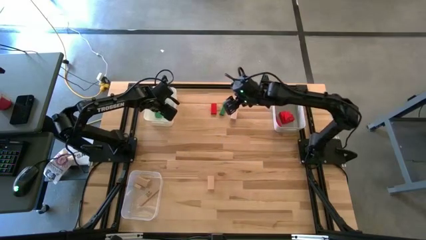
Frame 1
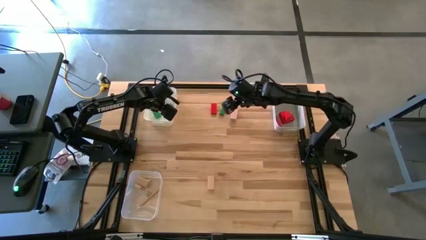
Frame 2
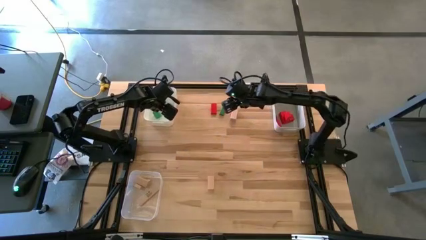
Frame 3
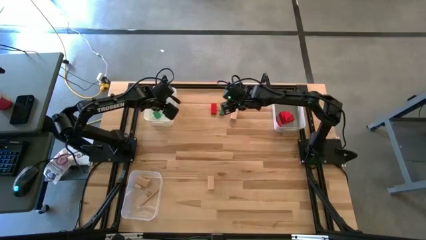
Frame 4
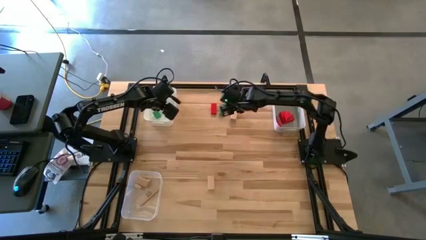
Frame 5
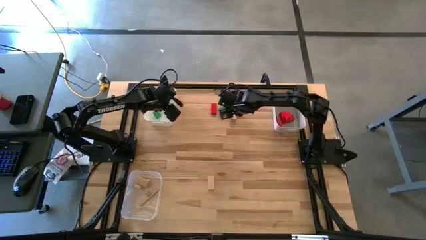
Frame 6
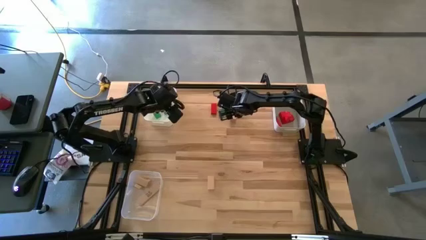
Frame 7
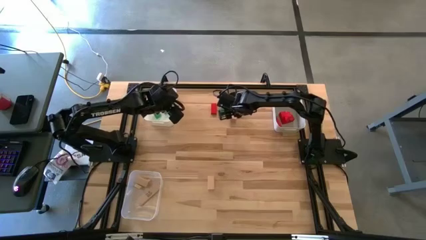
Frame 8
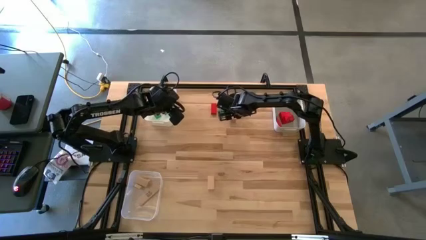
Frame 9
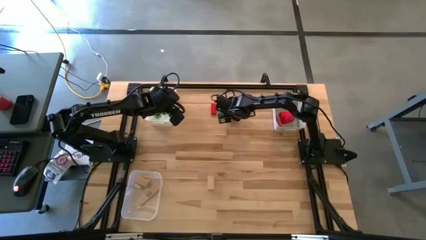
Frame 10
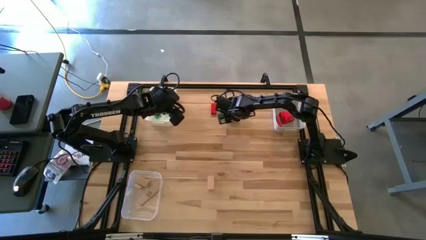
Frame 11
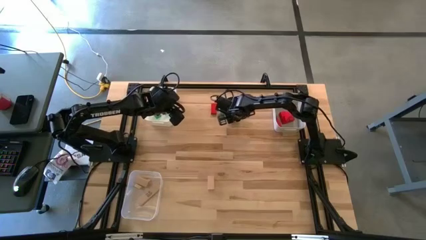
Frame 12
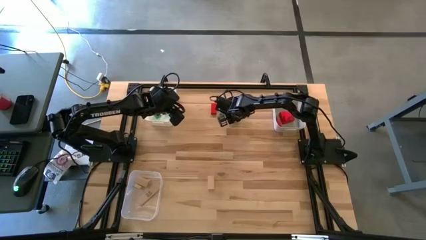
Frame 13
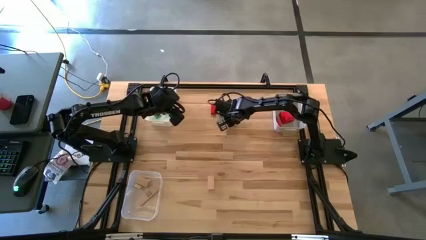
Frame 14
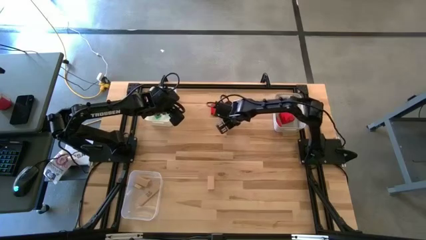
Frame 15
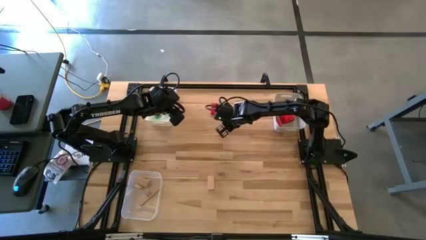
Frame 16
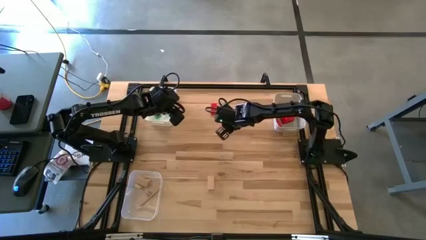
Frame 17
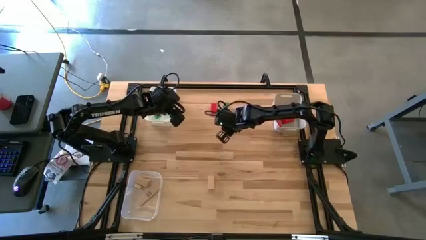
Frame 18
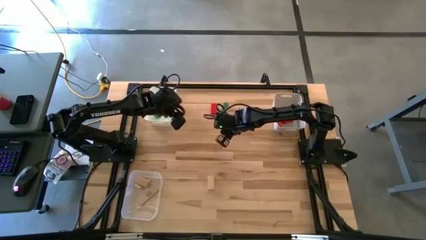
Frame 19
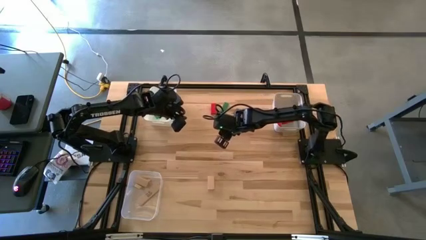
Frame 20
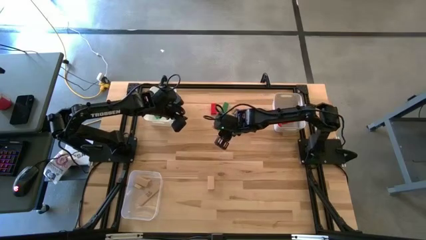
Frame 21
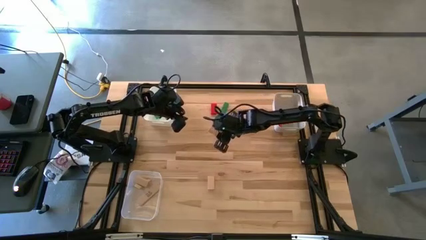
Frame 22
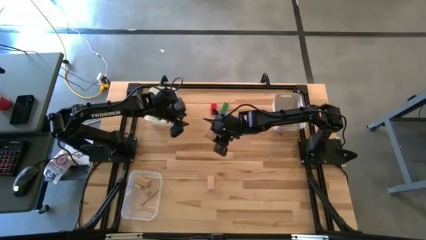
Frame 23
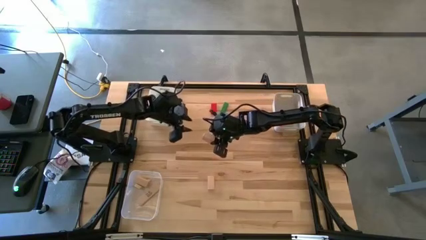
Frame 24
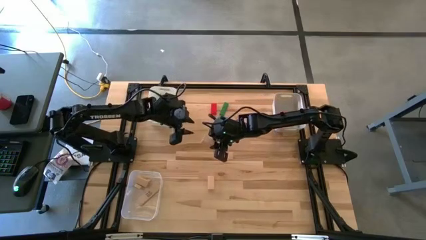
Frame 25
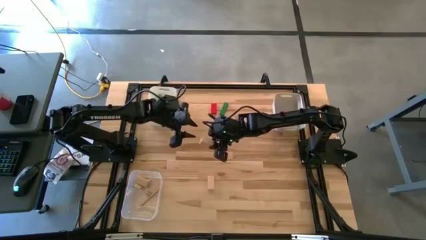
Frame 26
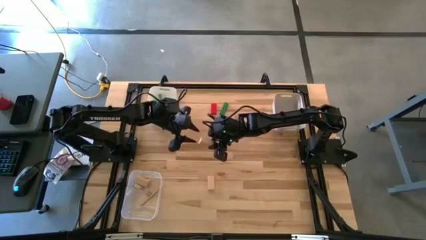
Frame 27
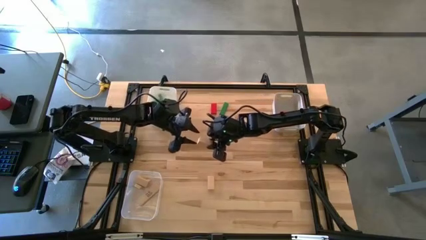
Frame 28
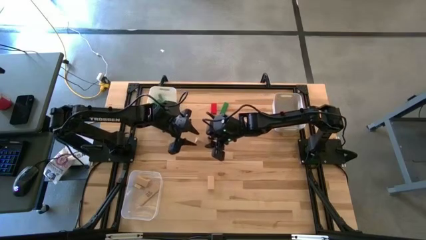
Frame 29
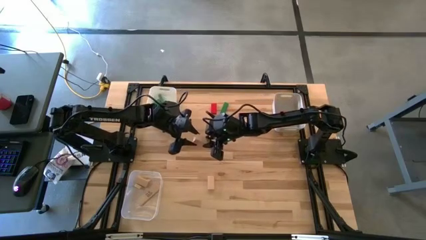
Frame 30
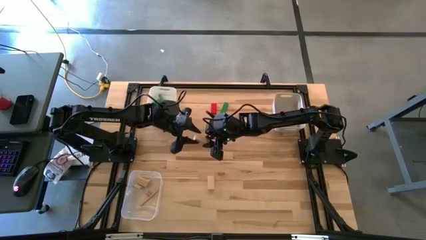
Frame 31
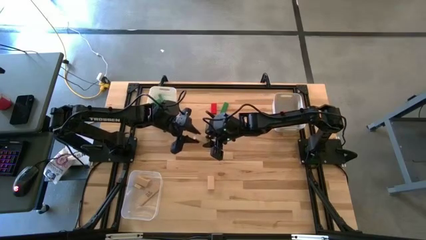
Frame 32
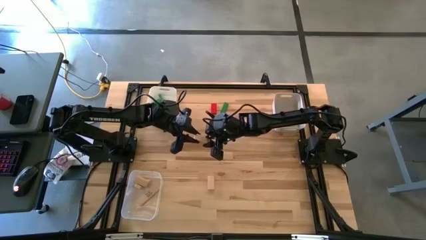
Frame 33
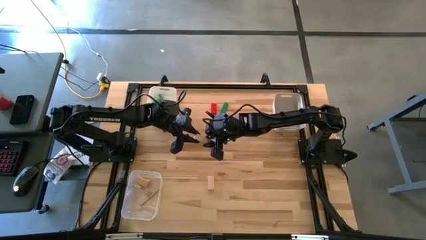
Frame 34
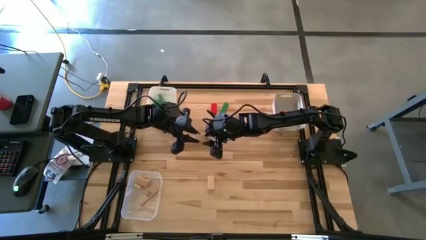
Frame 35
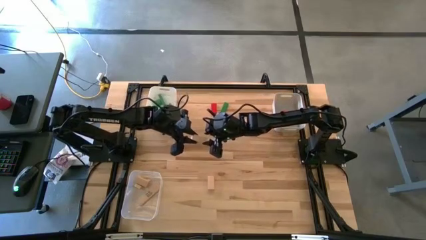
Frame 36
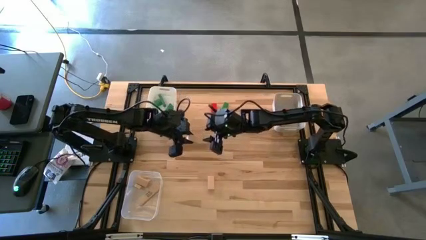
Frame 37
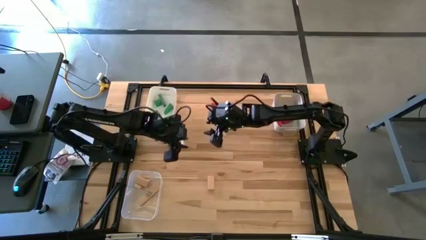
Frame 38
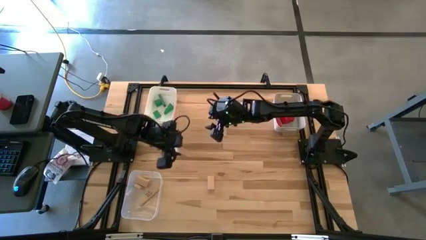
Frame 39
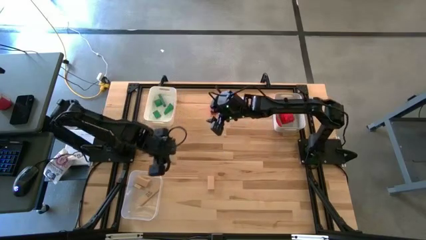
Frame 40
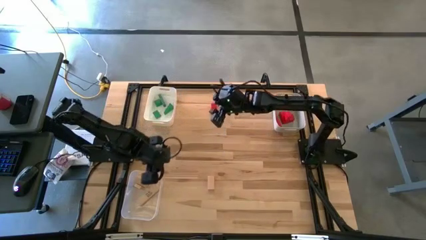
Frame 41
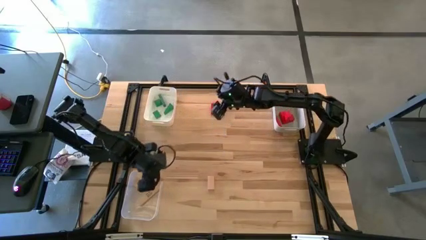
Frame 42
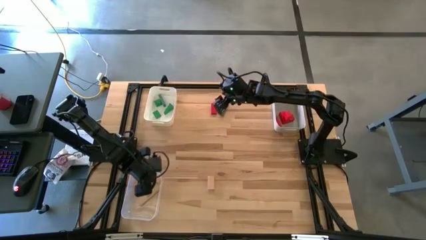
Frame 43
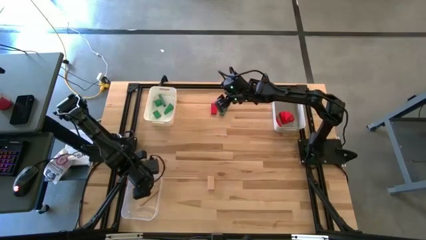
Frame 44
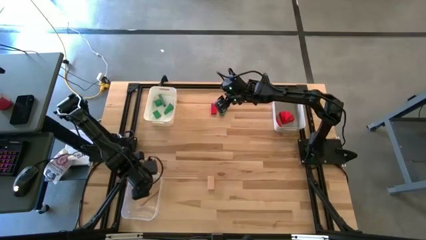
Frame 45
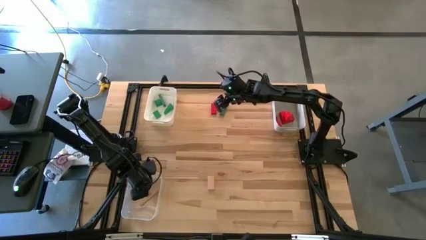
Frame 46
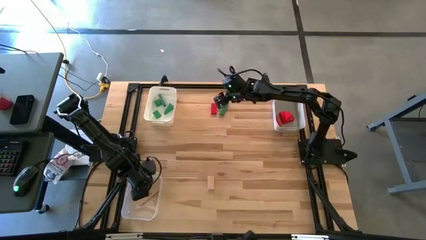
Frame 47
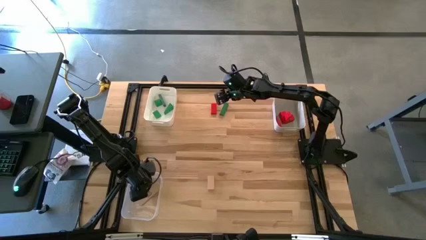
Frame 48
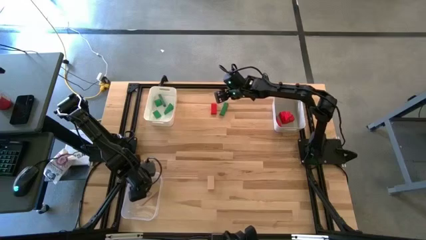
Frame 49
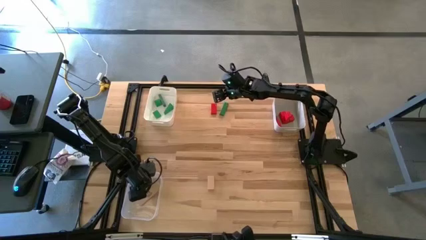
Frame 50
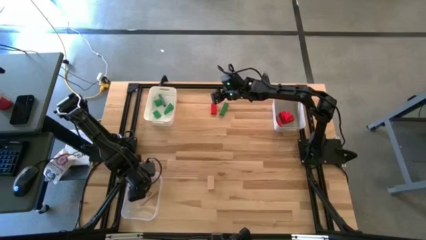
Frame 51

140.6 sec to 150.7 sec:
Task: Sort & place blocks by color
Put the brown block into the transparent bin
